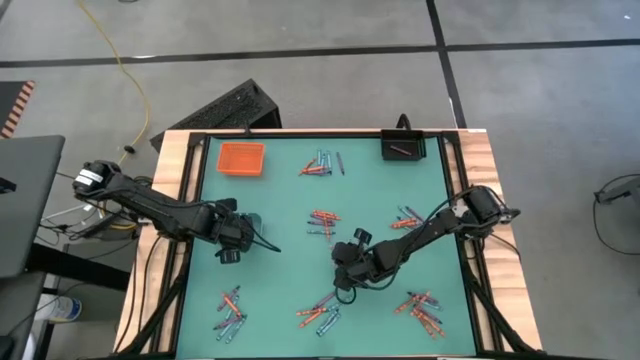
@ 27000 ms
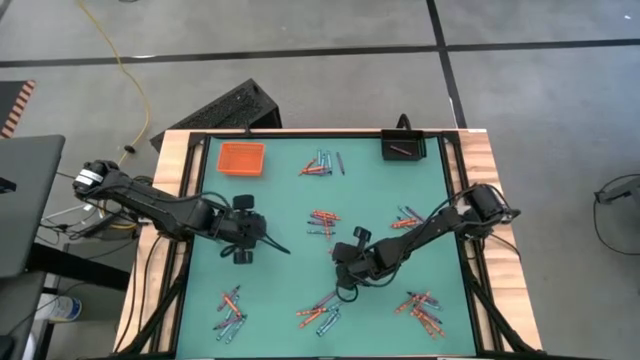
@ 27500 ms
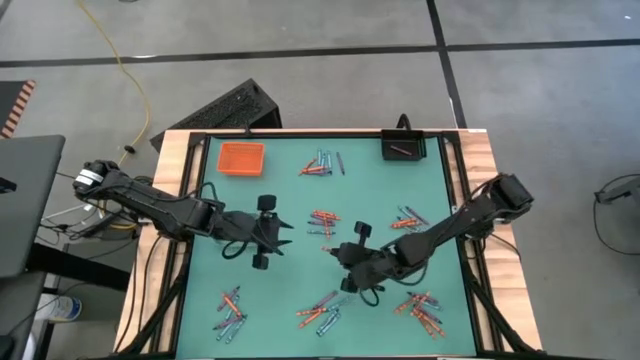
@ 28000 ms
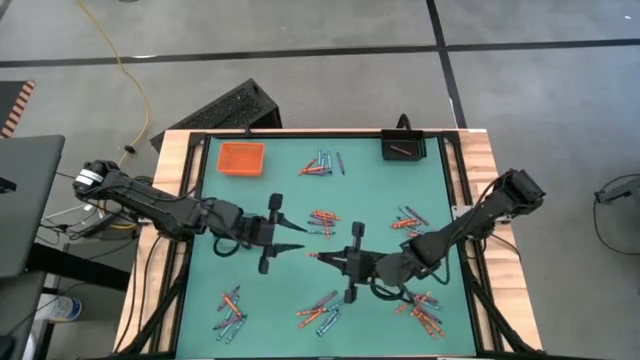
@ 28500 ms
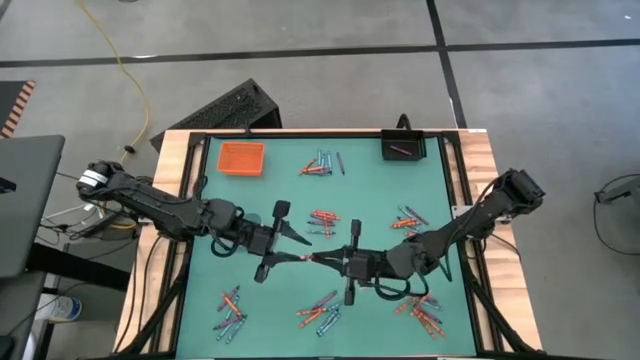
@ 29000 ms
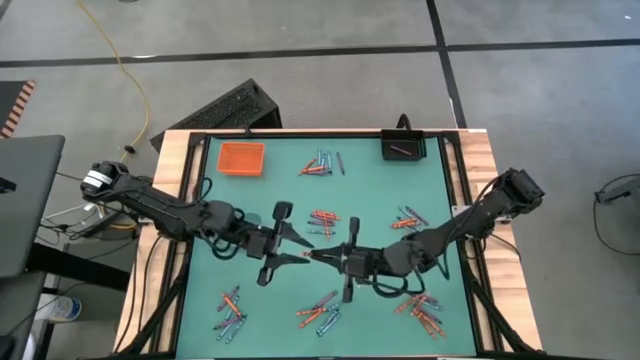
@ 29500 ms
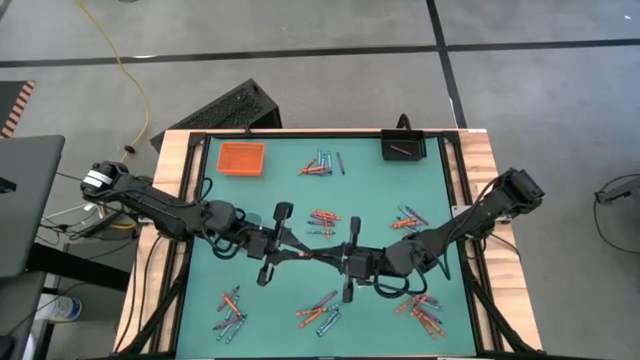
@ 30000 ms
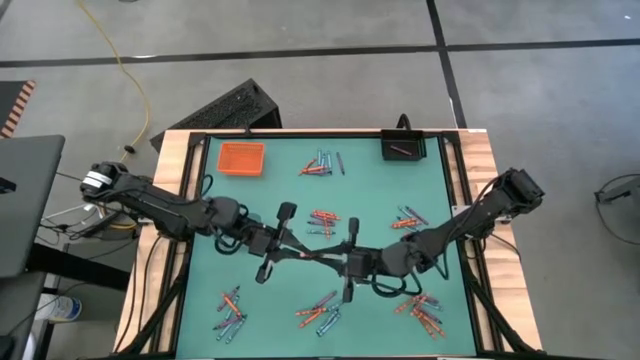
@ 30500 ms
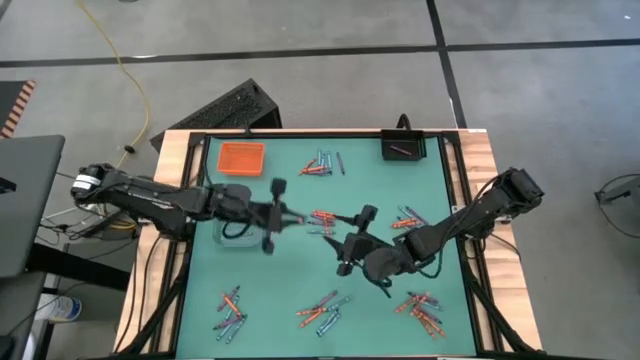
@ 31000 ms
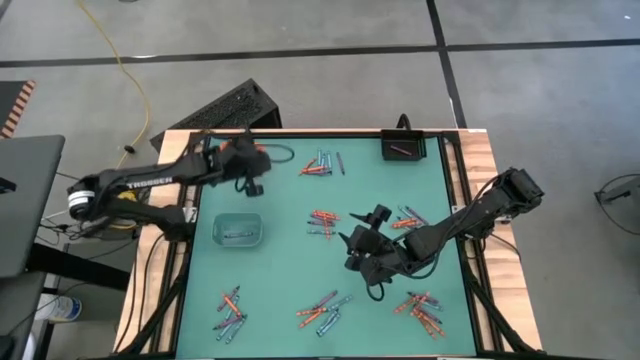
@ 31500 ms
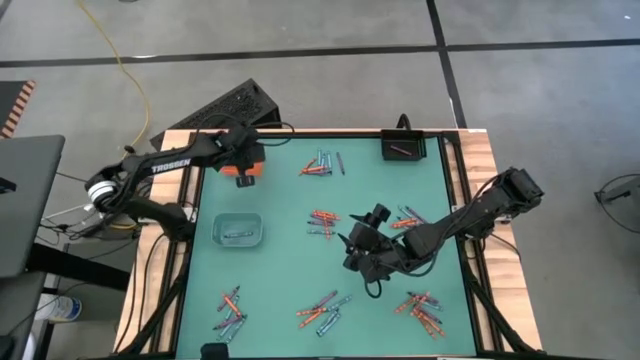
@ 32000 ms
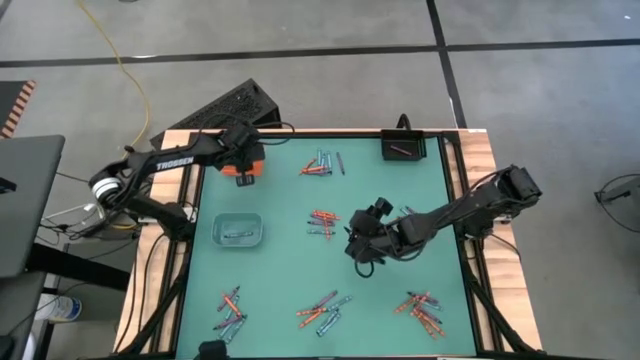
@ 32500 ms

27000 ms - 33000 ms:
Task: Sort crayons
Put the orange crayon into the top orange basket

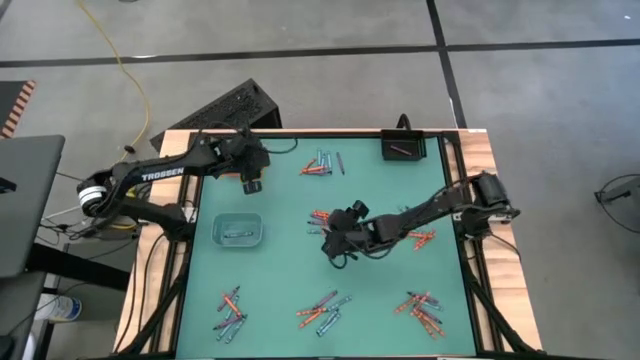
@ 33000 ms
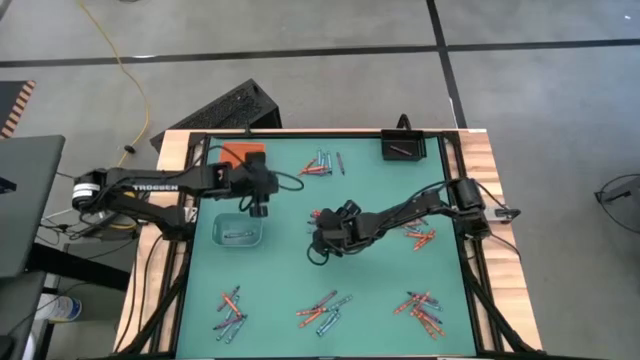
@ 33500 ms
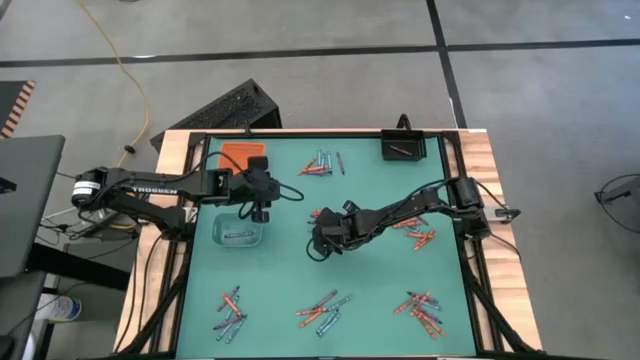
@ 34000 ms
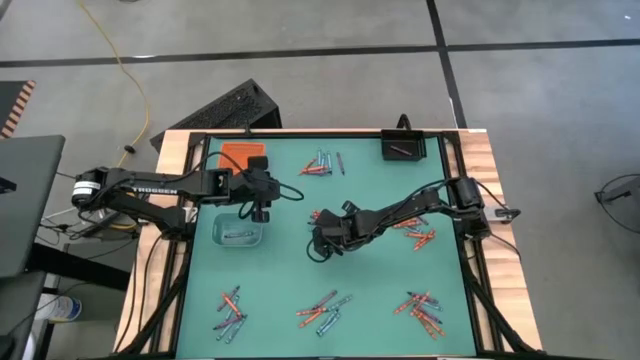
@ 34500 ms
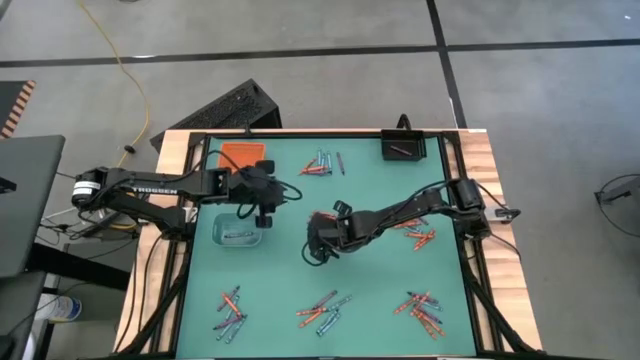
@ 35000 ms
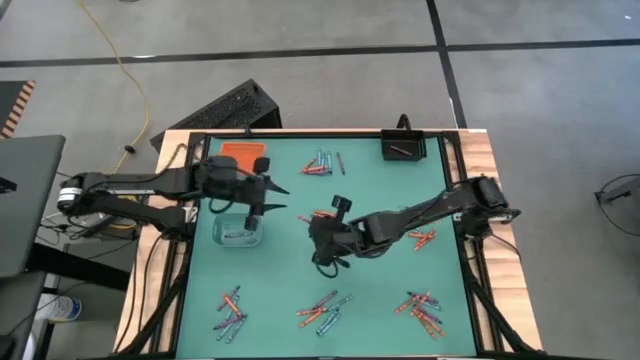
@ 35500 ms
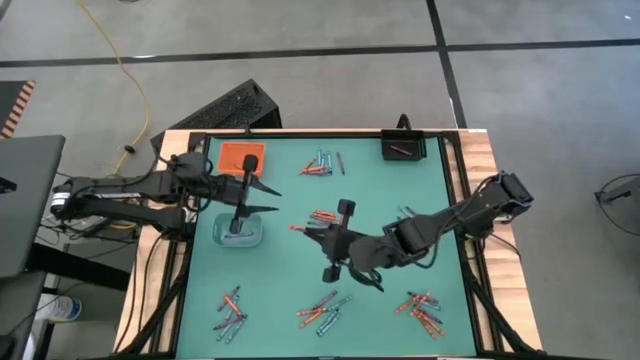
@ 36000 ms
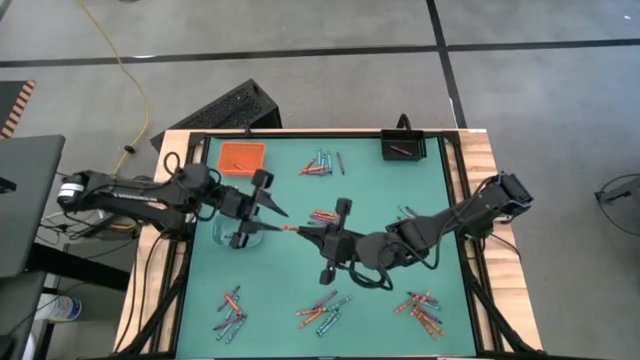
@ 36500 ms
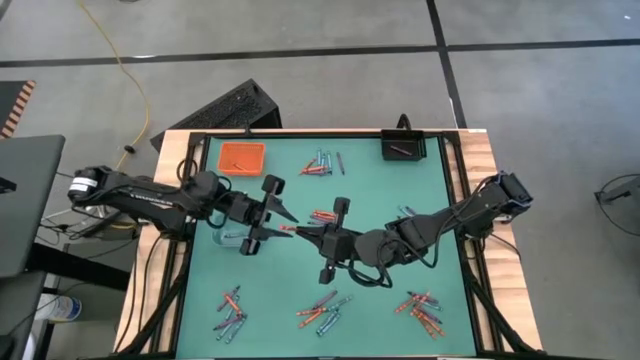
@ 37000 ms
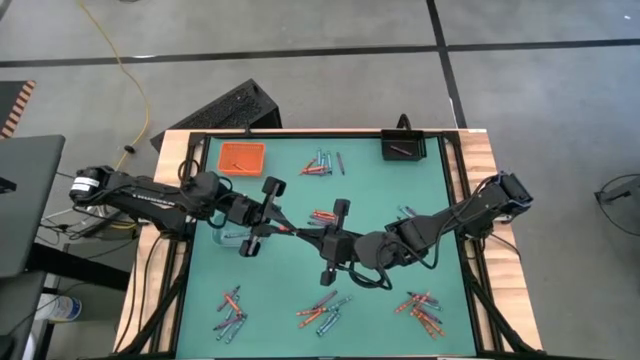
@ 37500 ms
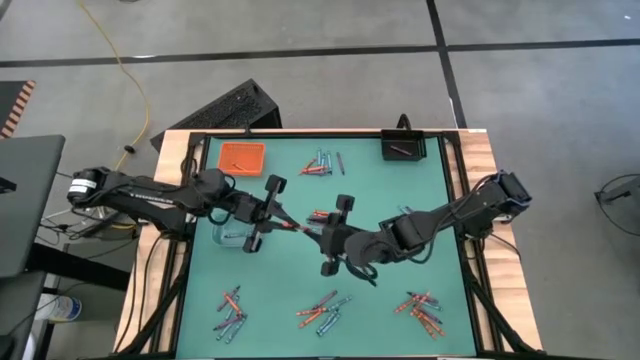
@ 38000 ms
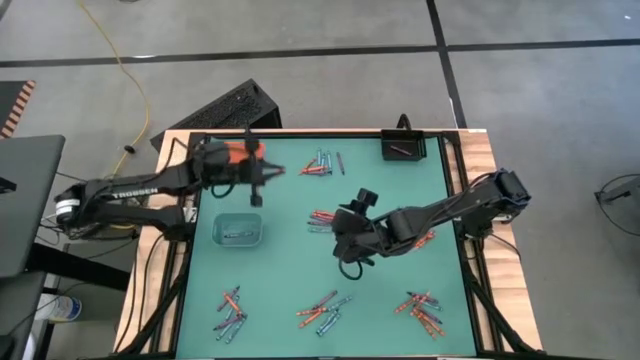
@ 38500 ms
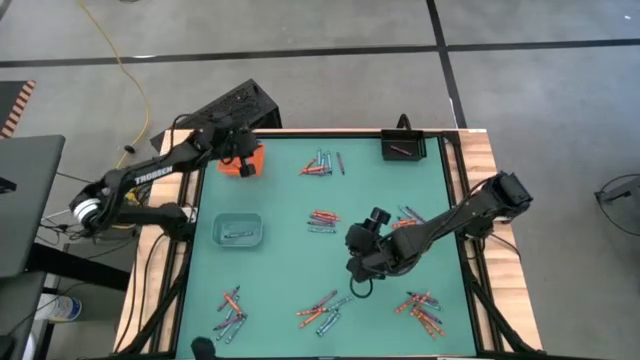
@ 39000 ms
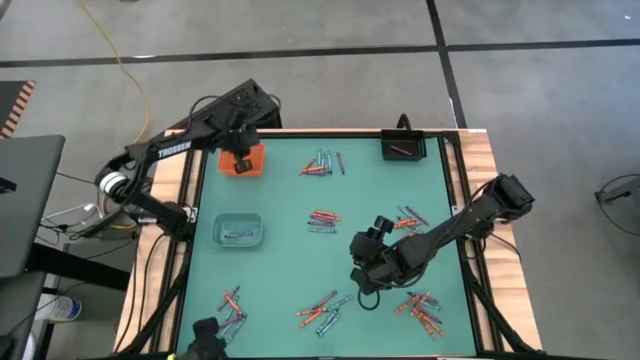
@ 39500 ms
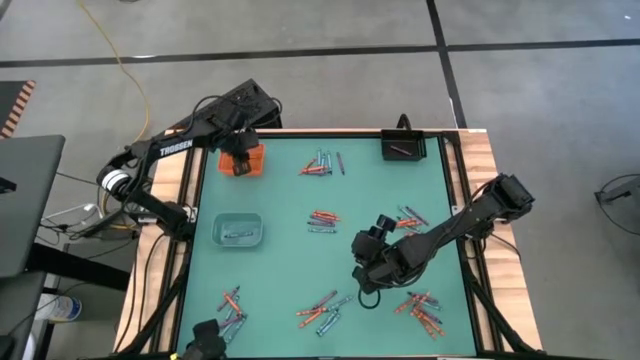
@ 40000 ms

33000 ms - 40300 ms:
Put the orange crayon into the orange bin

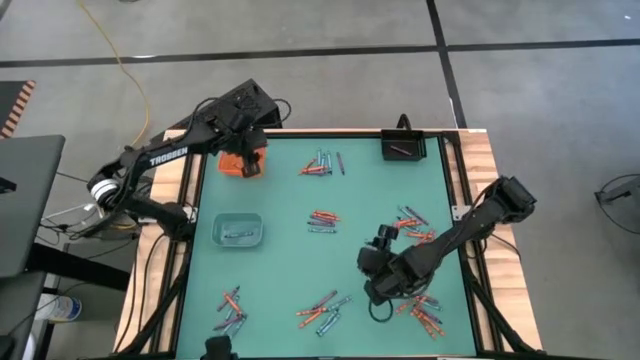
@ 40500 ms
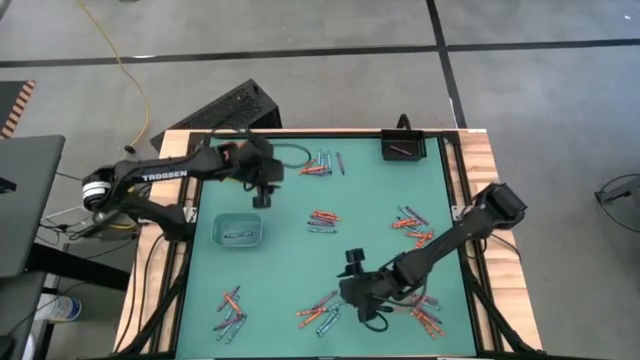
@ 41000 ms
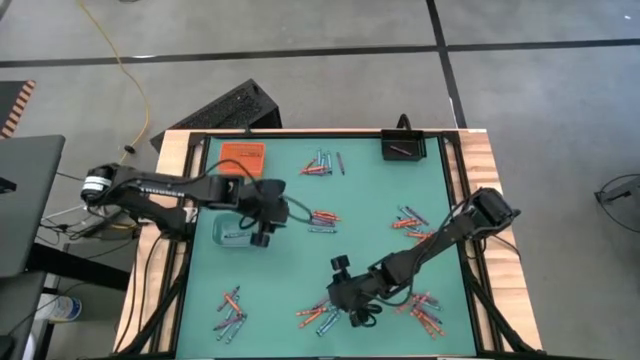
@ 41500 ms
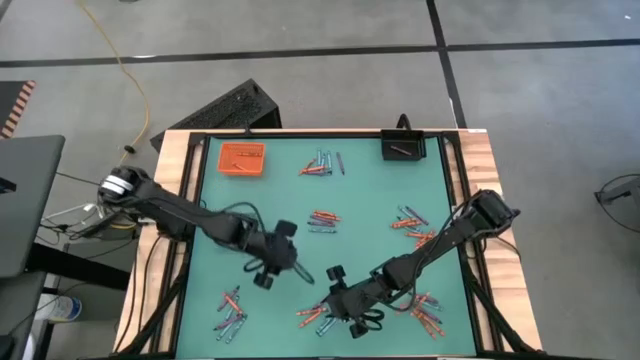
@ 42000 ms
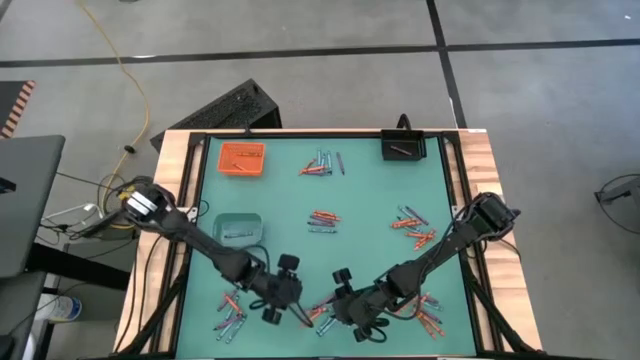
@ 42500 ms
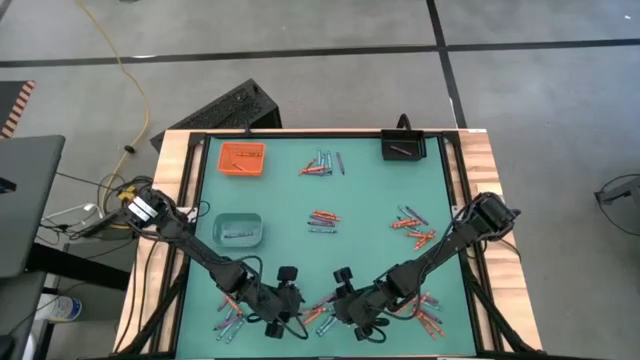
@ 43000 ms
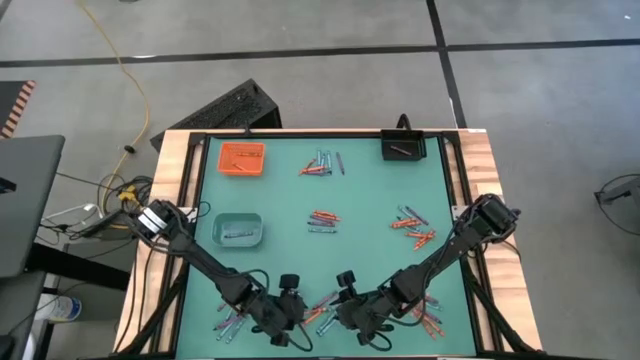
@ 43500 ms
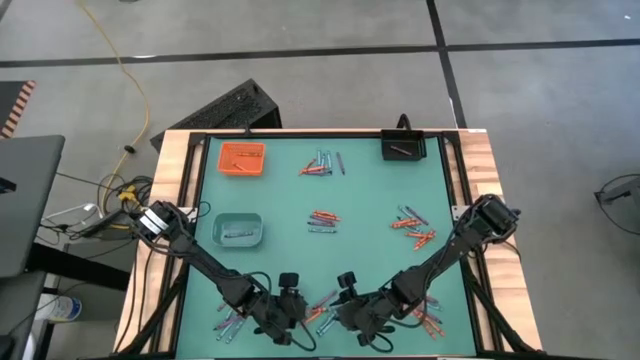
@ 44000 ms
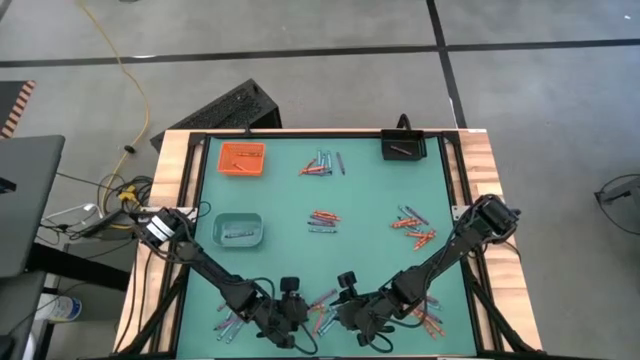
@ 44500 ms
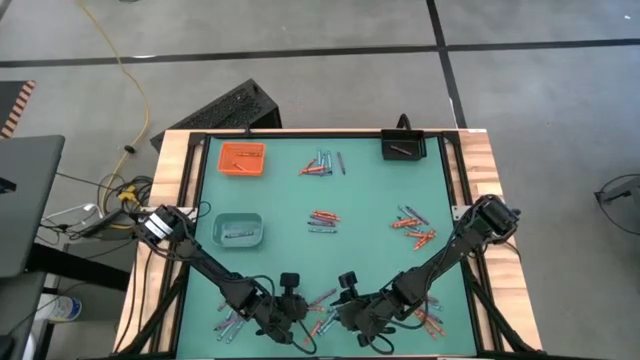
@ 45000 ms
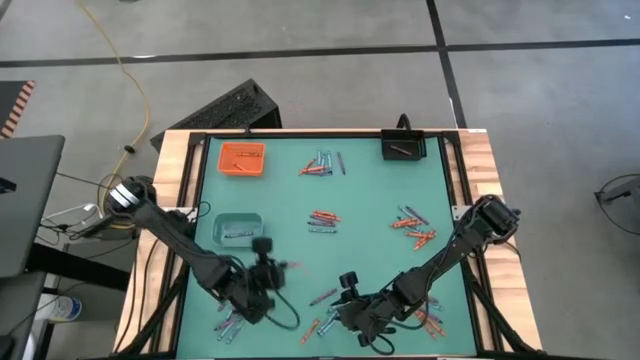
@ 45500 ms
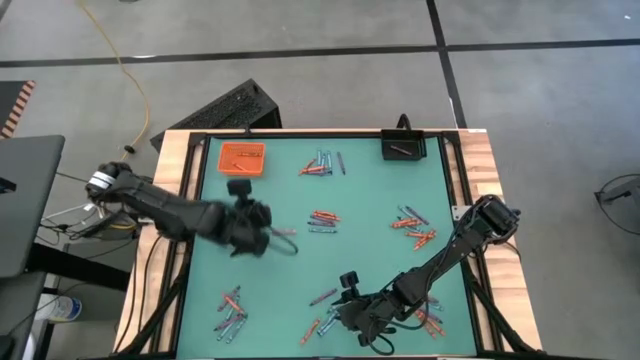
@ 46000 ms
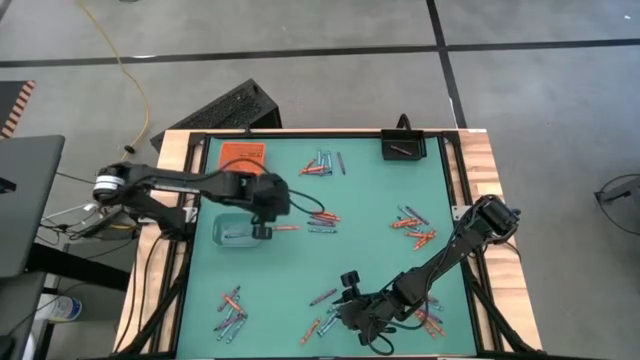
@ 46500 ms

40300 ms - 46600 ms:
Put the orange crayon into the orange basket

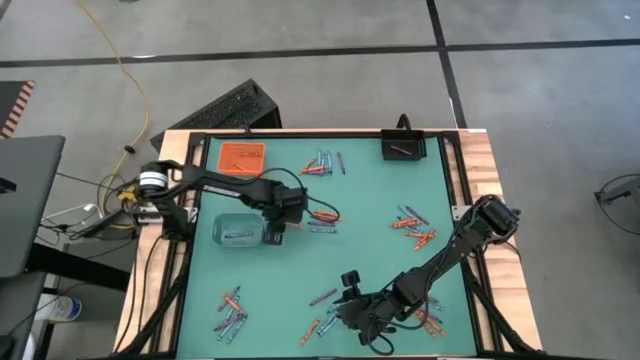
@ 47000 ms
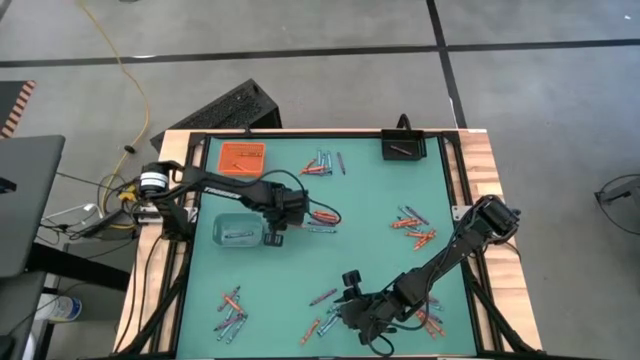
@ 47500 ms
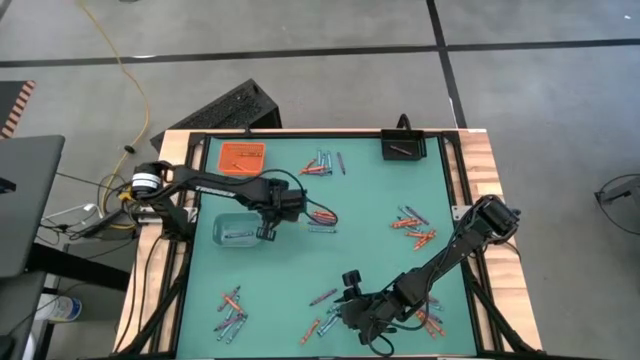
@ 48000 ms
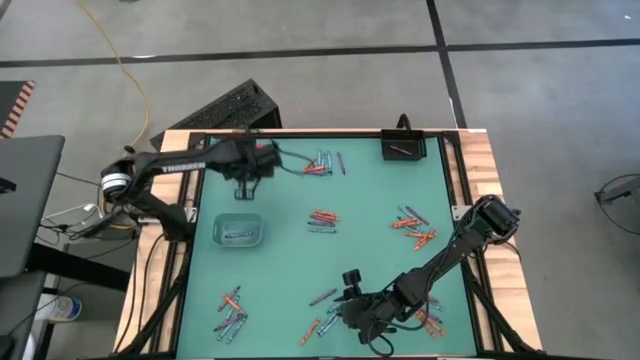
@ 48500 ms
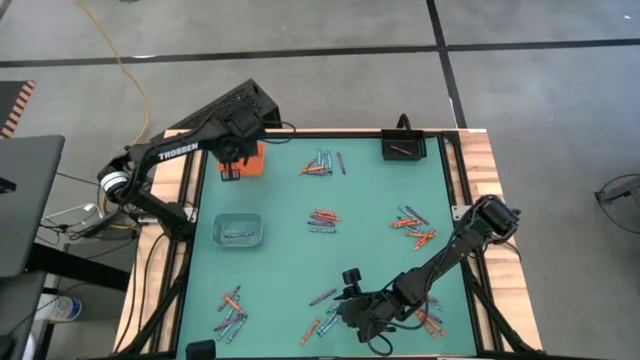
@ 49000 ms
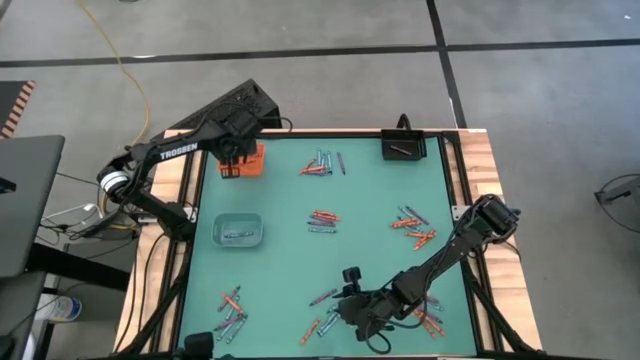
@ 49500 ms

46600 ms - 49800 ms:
Put the orange crayon into the orange basket
